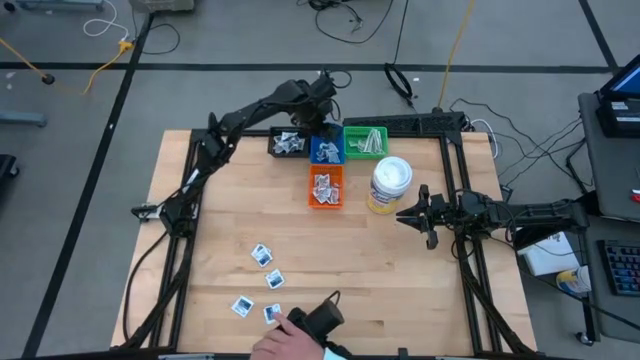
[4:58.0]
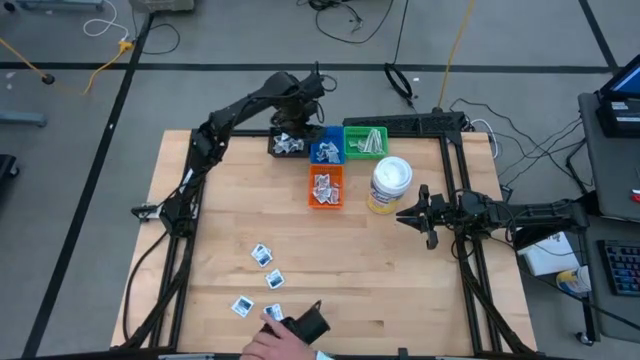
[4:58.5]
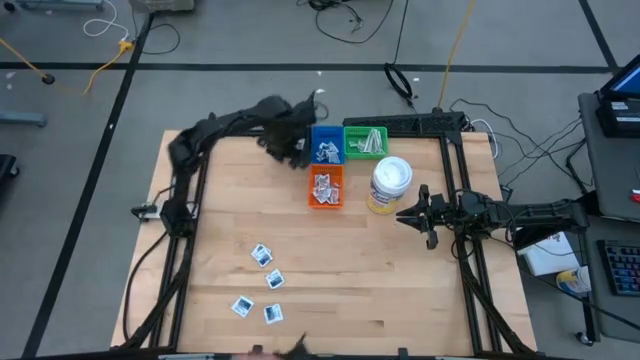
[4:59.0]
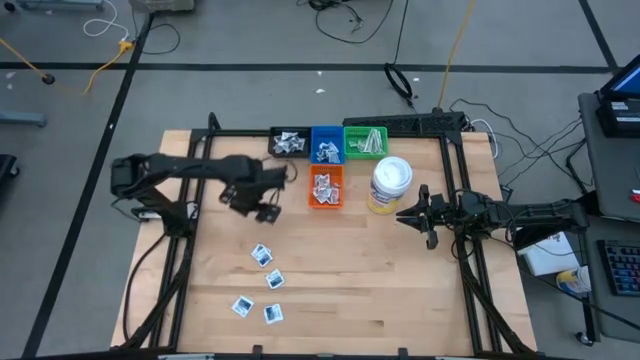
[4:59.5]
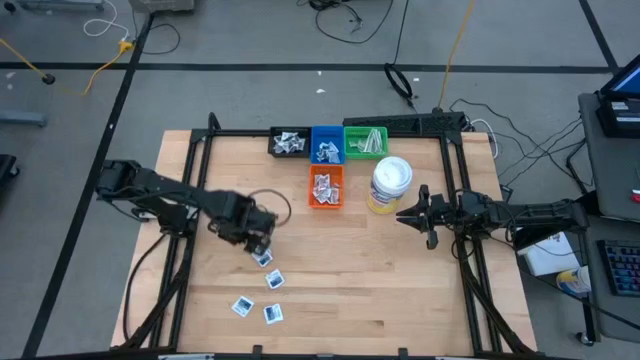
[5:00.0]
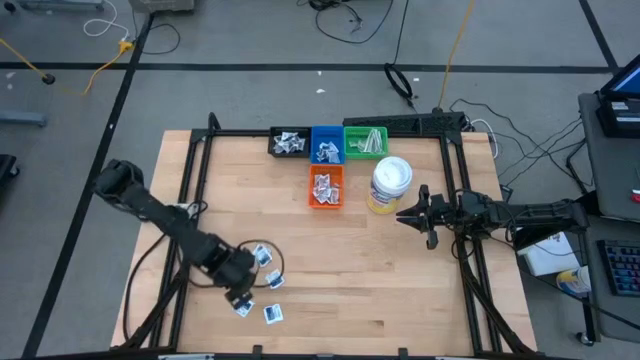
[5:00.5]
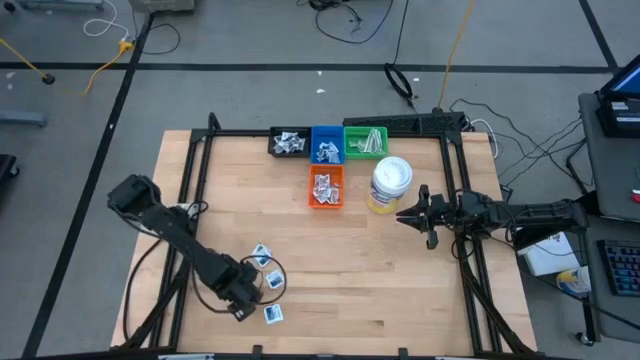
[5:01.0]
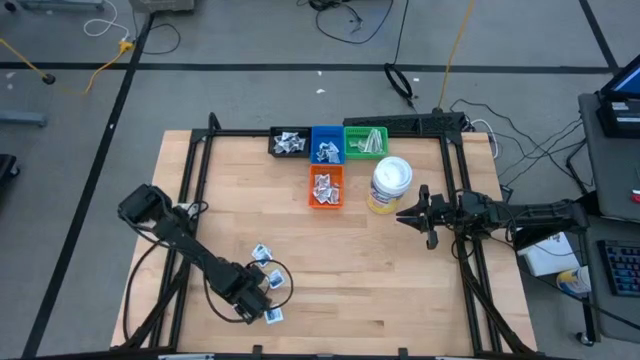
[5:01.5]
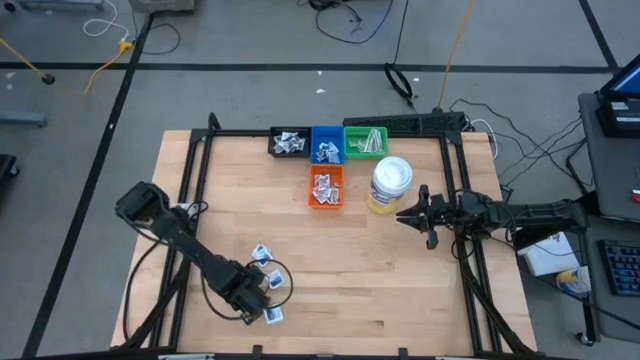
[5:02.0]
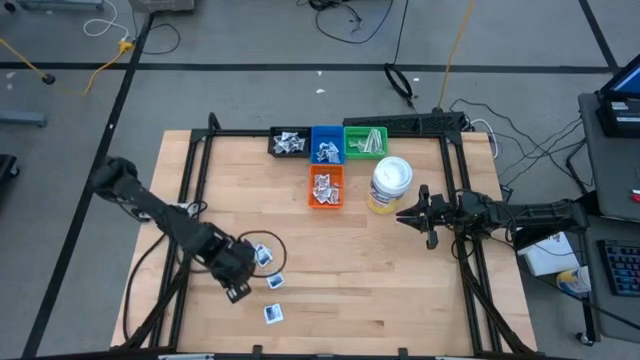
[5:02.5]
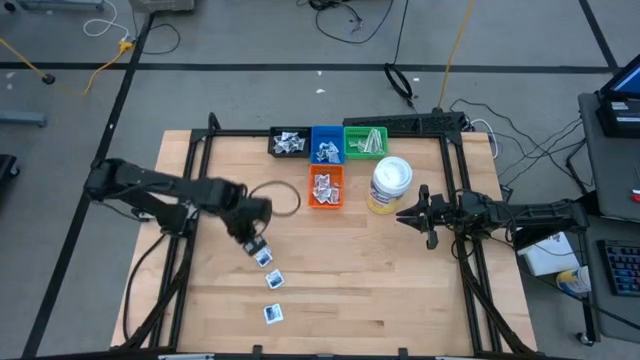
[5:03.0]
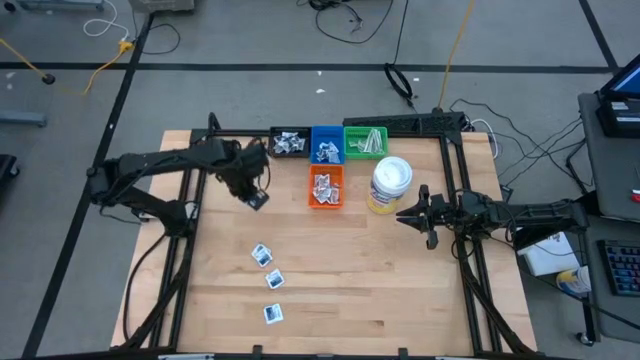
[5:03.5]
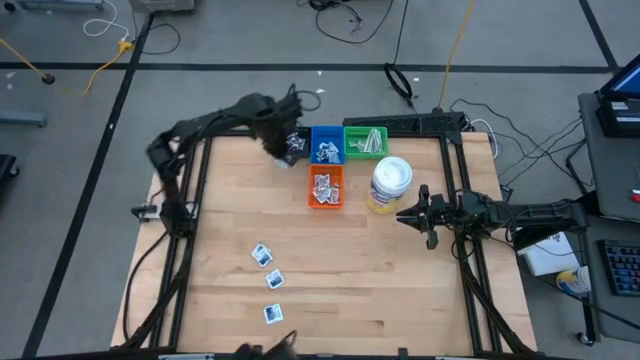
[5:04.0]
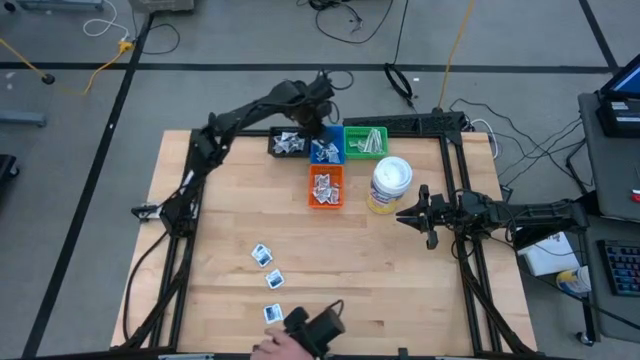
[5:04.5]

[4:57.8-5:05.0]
Task: Pick & Place First Aid Supplies
Put the blue alcohol pad into the blue bin

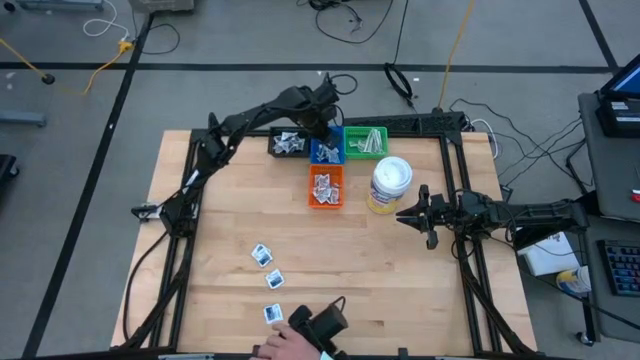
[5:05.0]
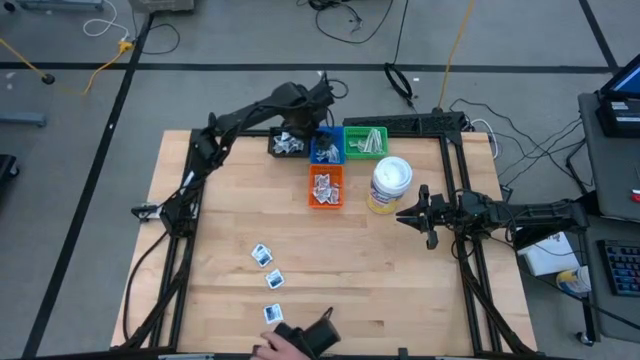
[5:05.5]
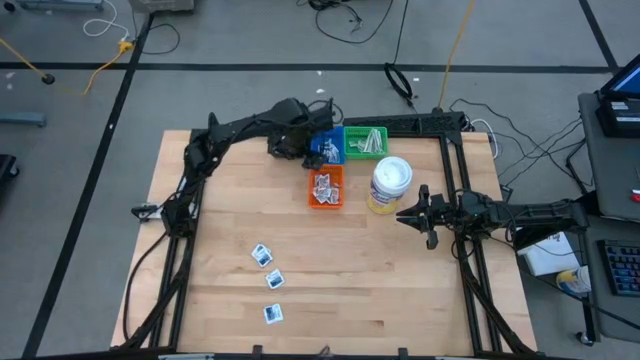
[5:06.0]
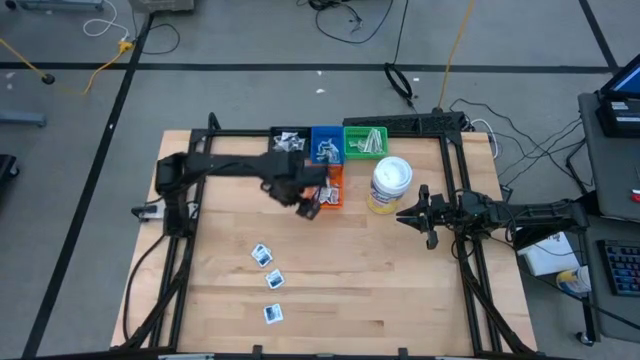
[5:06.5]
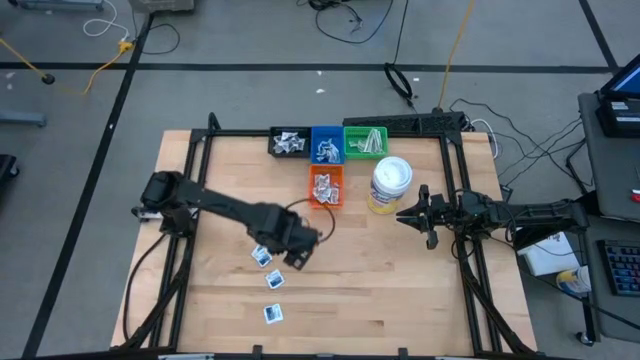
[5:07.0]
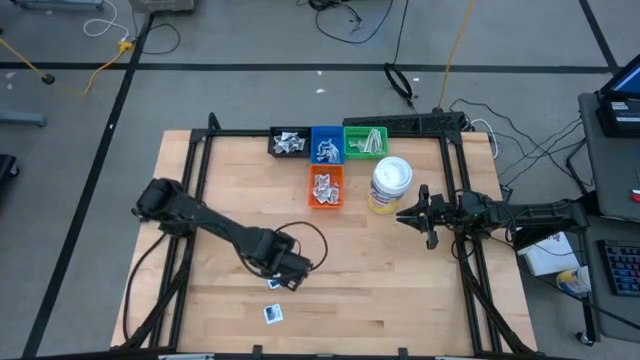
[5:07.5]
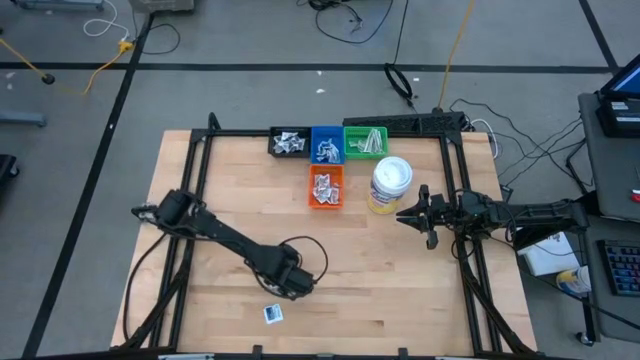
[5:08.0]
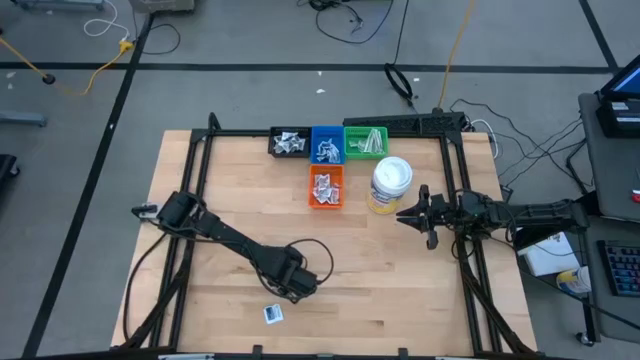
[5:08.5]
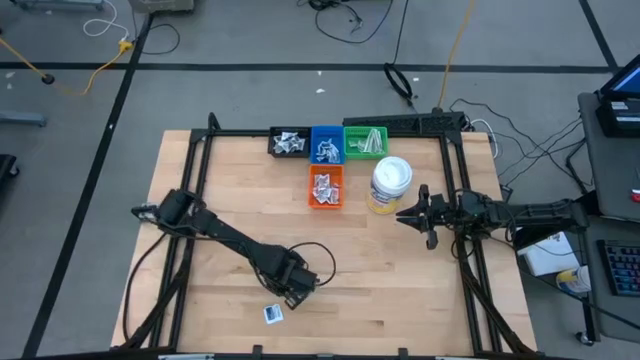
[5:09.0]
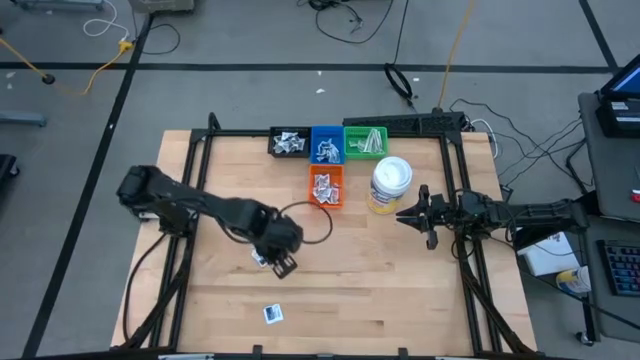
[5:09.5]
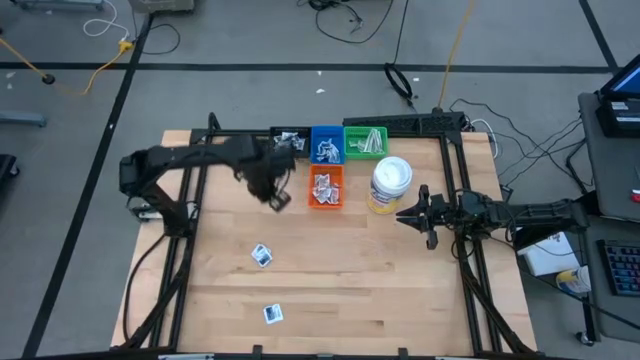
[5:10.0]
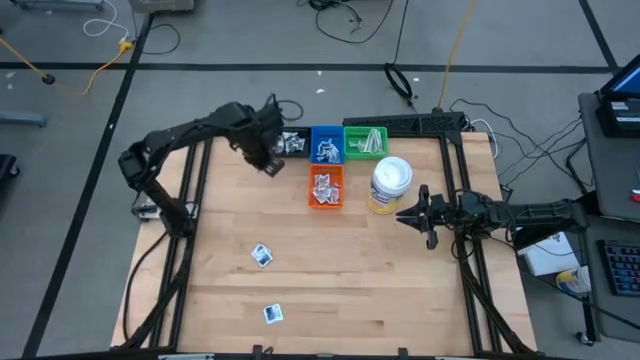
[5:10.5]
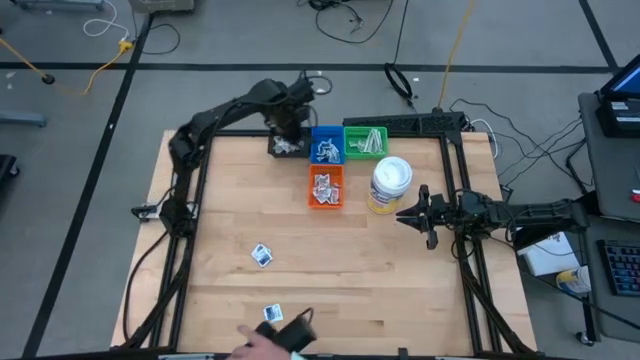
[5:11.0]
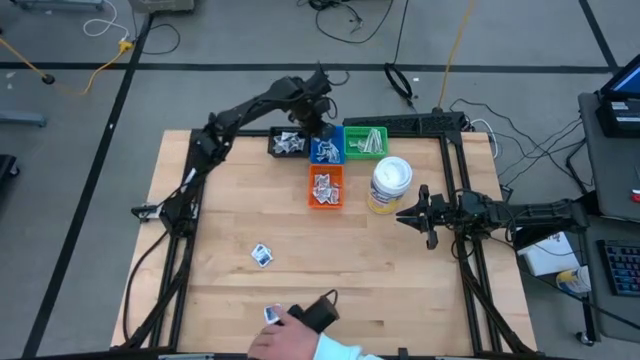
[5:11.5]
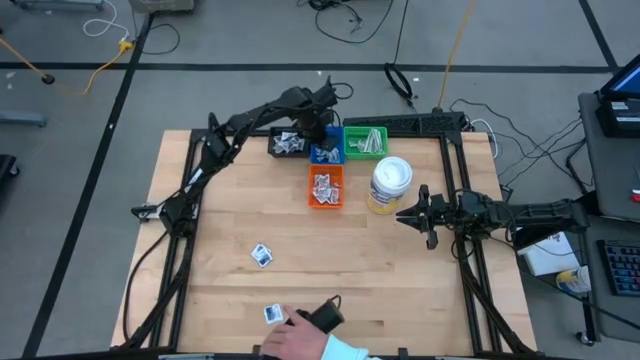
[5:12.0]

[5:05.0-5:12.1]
Put the blue alcohol pad into the blue bin

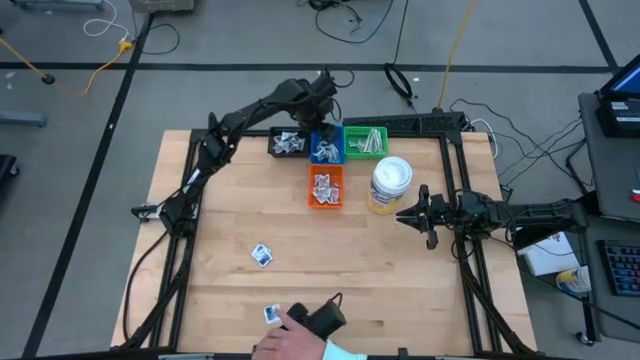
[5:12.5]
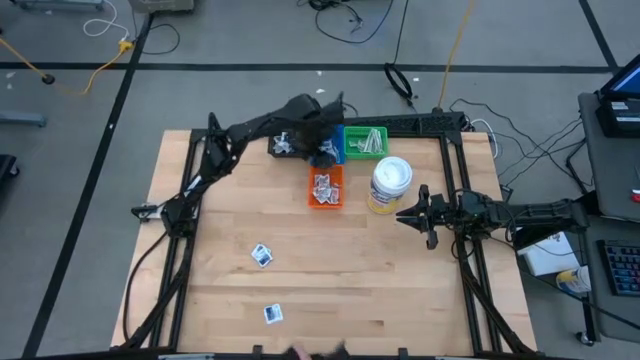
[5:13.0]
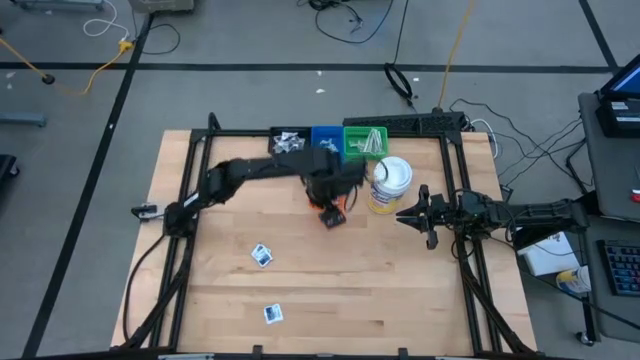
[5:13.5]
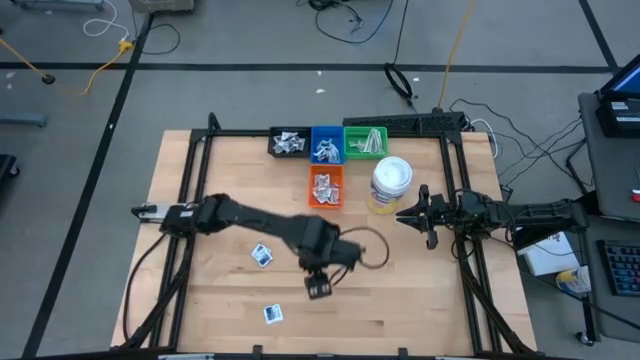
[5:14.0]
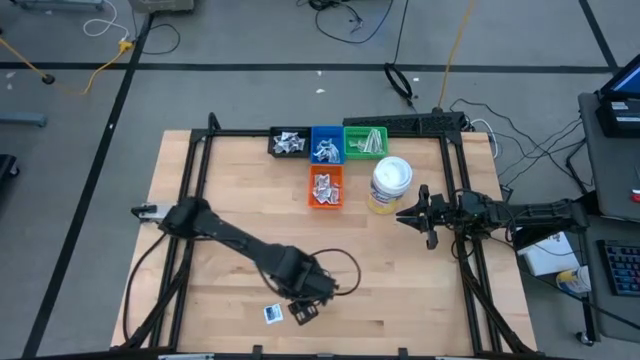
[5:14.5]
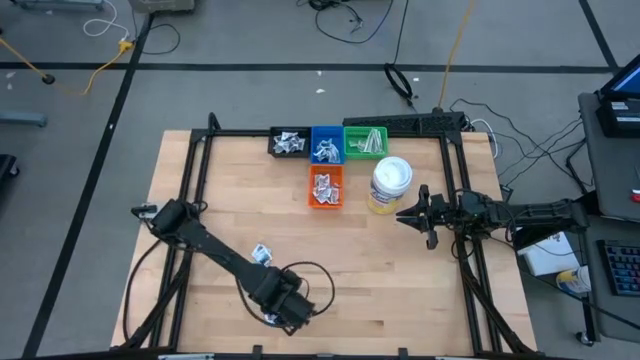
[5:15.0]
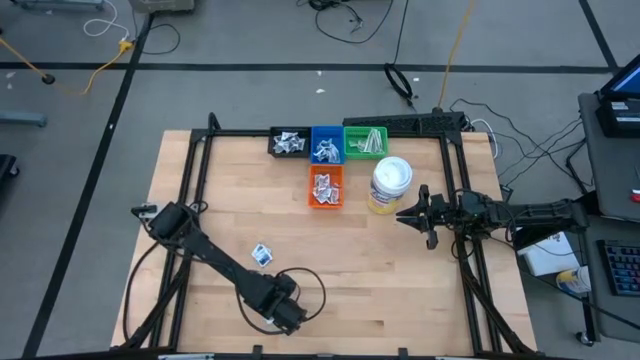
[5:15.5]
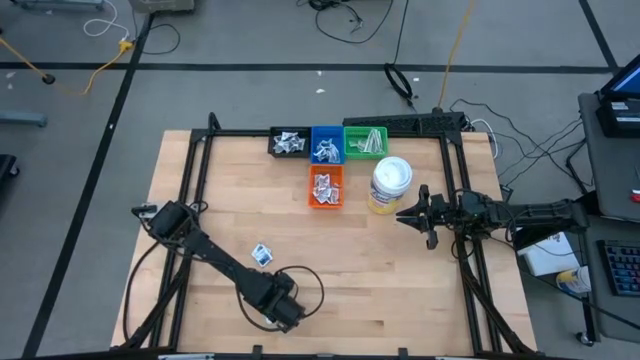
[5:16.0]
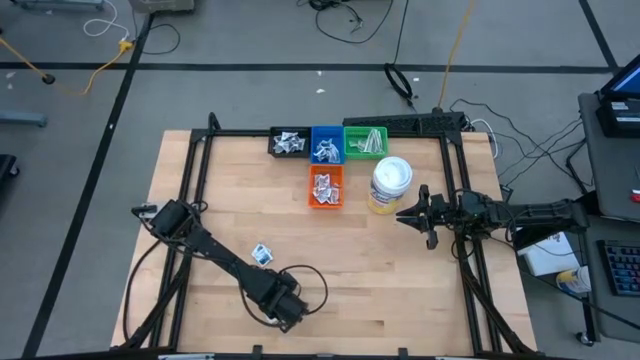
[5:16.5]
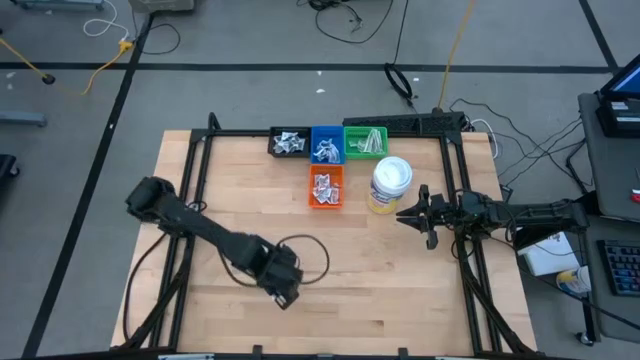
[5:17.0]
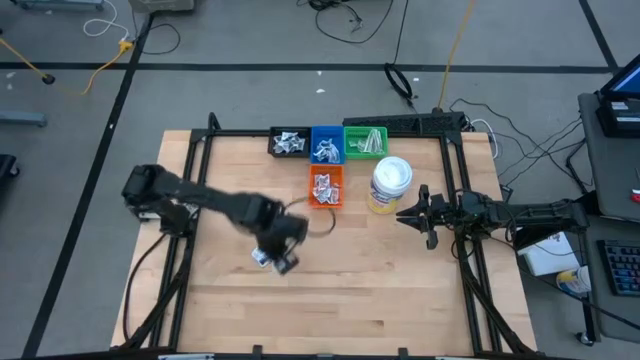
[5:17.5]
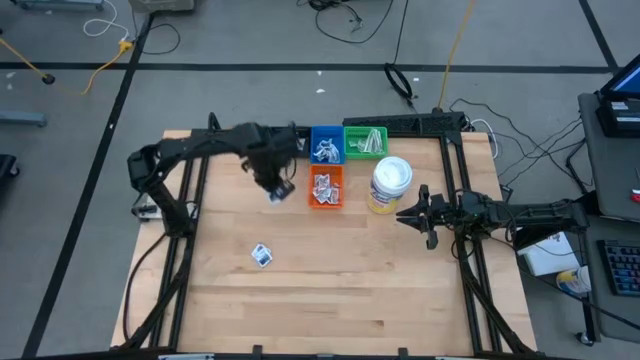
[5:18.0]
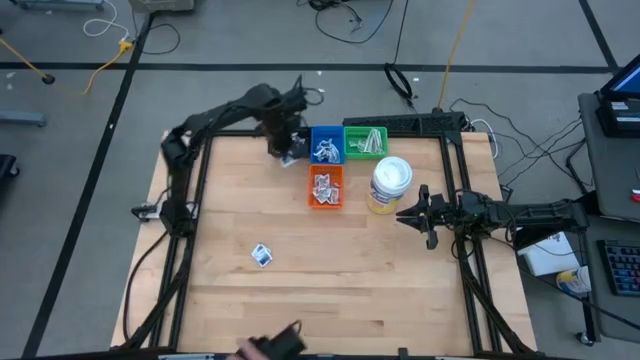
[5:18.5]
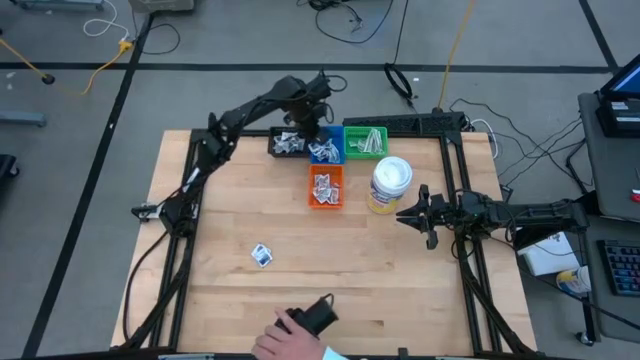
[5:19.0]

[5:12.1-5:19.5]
Put the blue alcohol pad into the blue bin

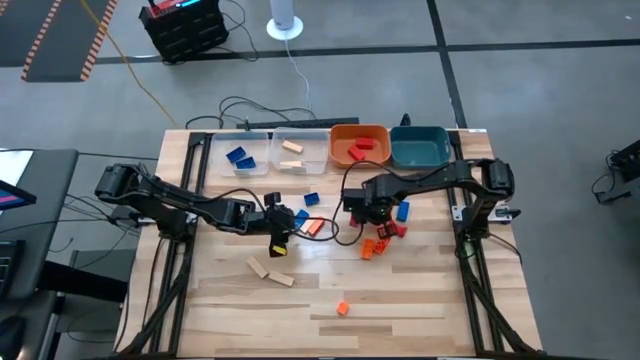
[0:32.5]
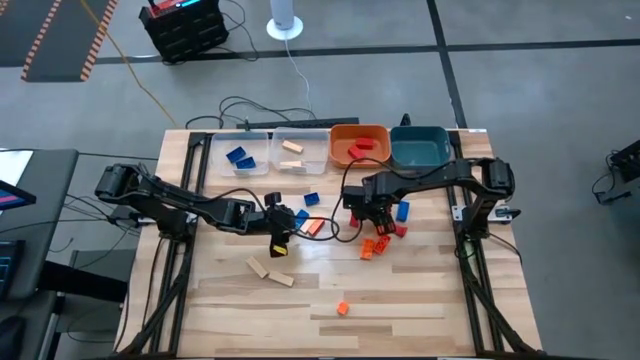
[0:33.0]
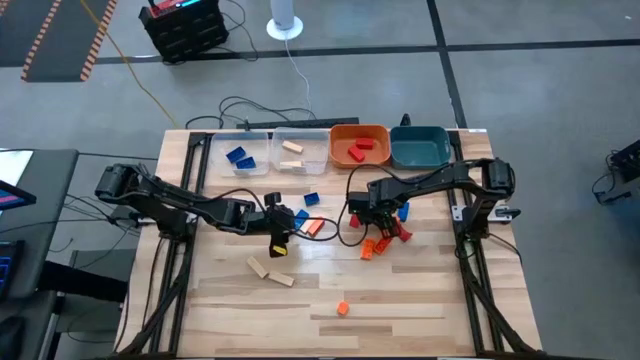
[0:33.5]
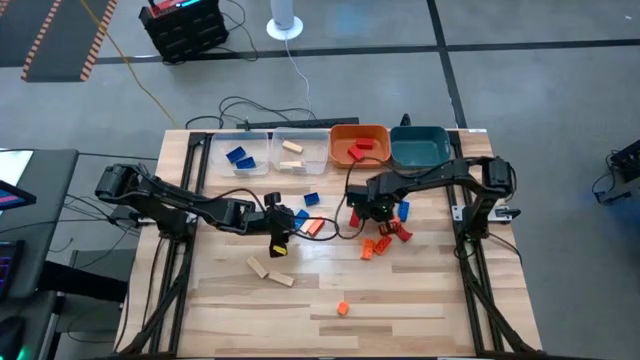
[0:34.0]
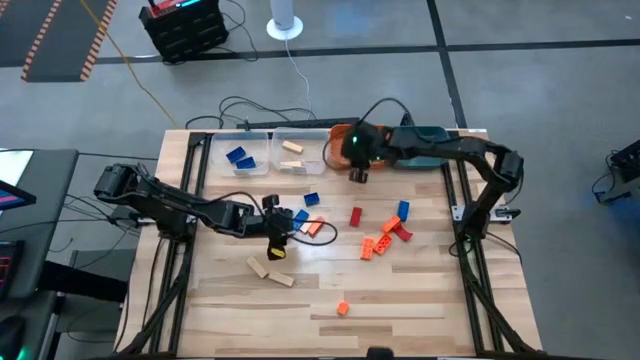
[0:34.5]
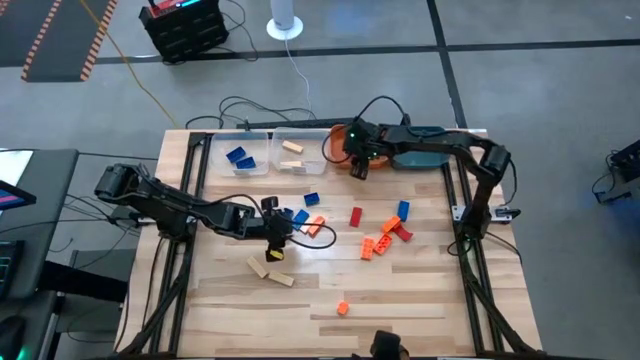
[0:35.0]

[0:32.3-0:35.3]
Task: Sort blocks
Put the red block into the orange bin
